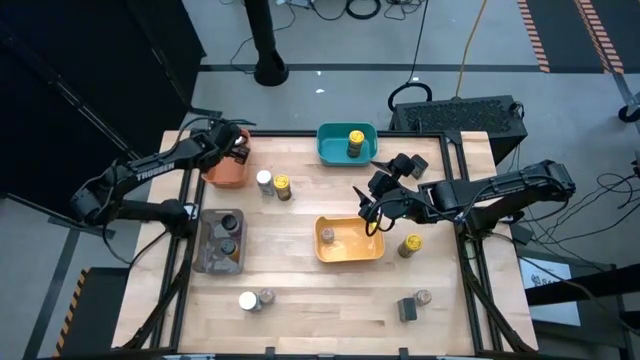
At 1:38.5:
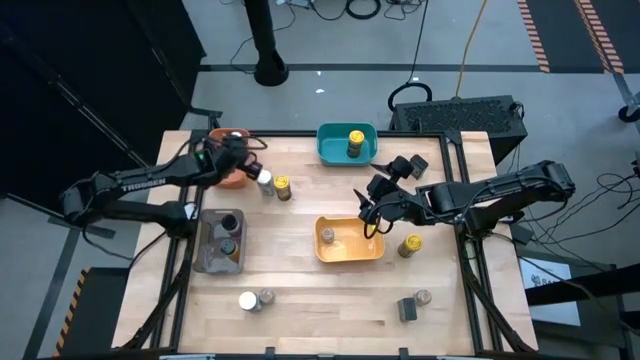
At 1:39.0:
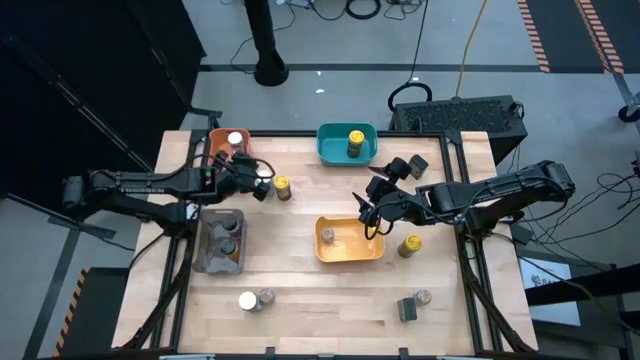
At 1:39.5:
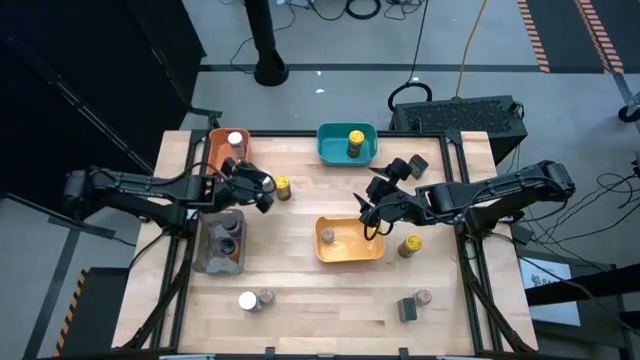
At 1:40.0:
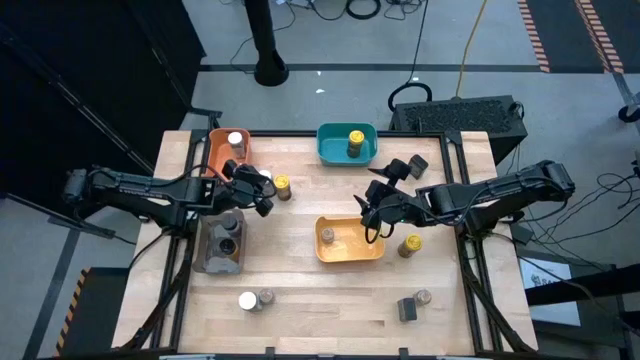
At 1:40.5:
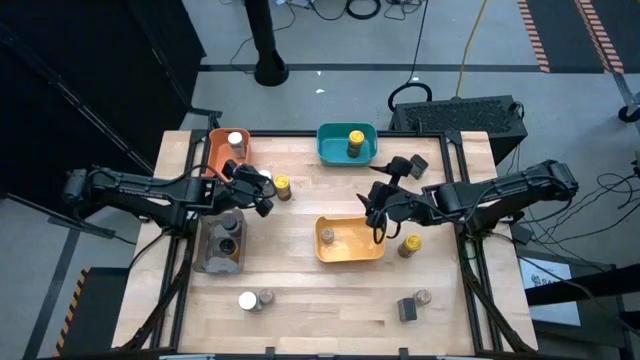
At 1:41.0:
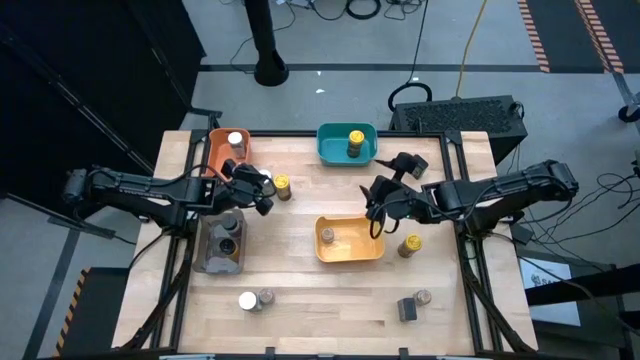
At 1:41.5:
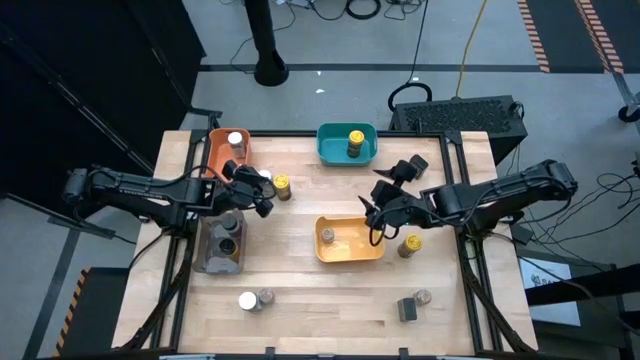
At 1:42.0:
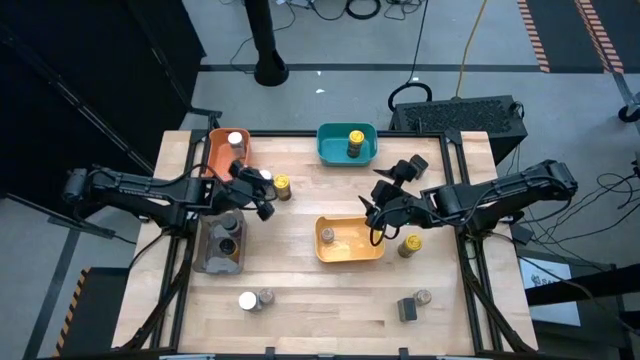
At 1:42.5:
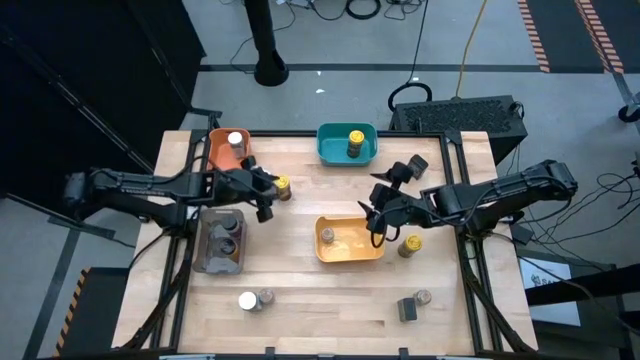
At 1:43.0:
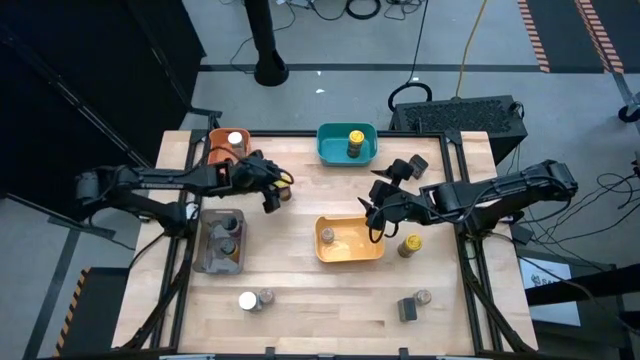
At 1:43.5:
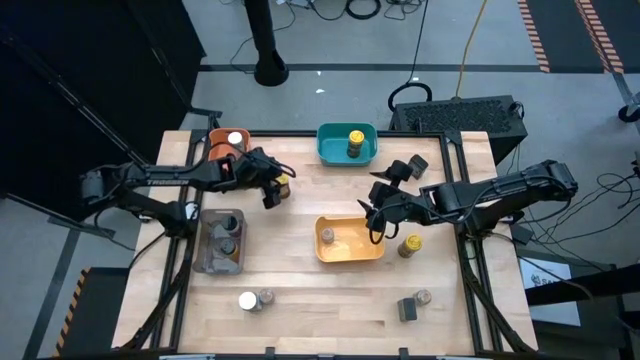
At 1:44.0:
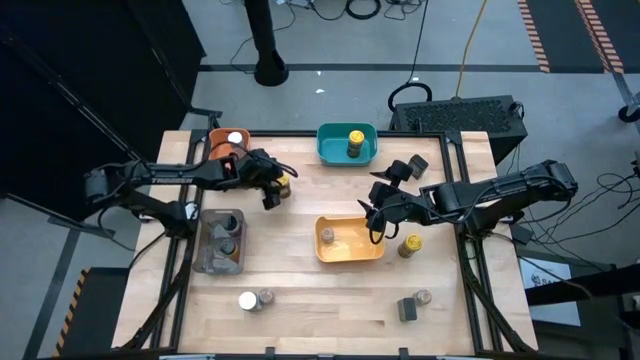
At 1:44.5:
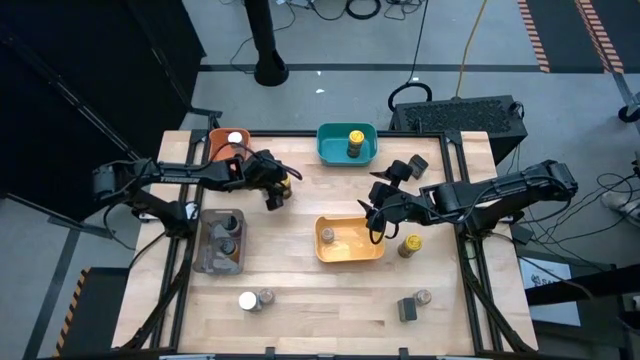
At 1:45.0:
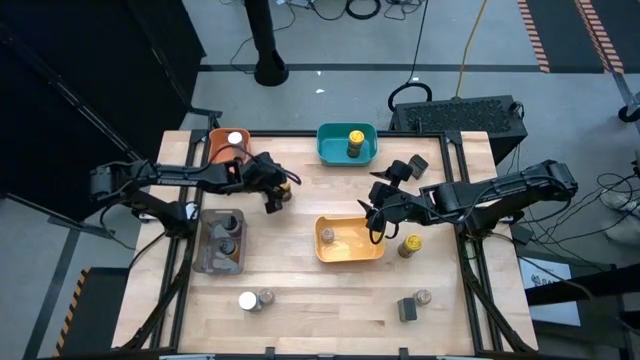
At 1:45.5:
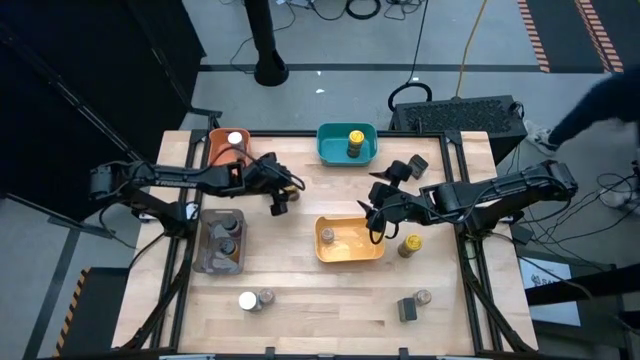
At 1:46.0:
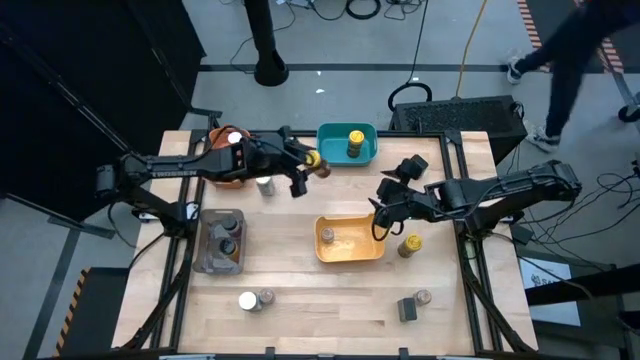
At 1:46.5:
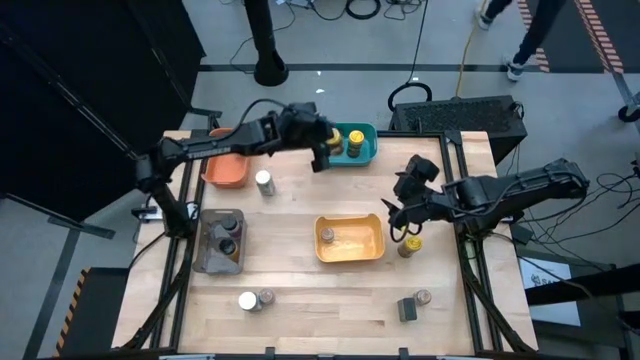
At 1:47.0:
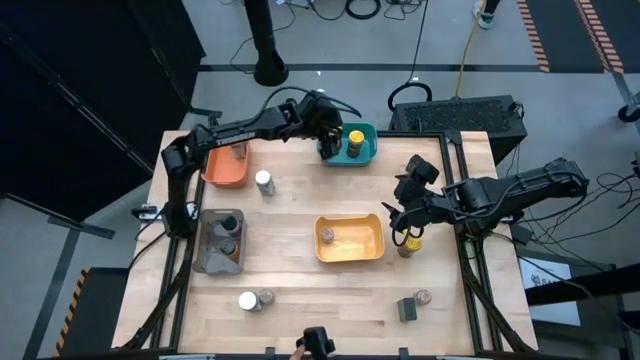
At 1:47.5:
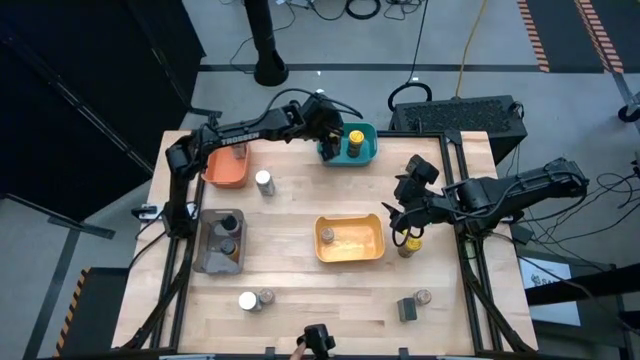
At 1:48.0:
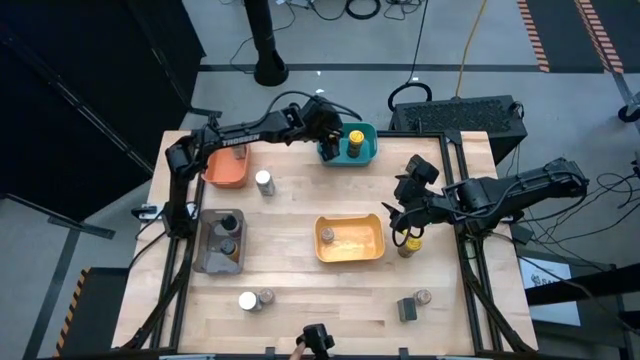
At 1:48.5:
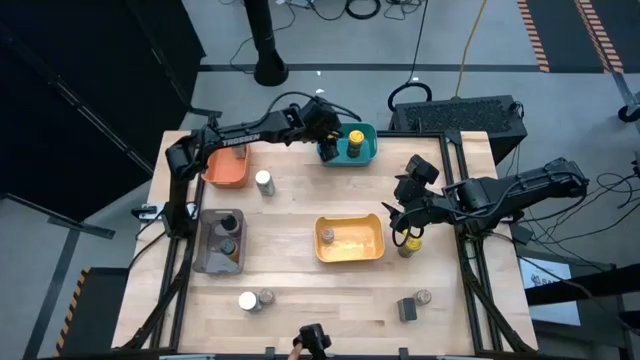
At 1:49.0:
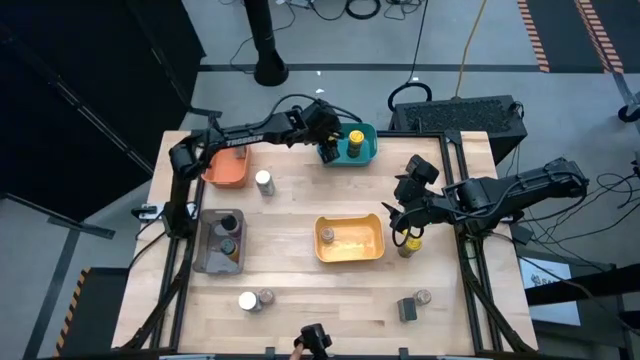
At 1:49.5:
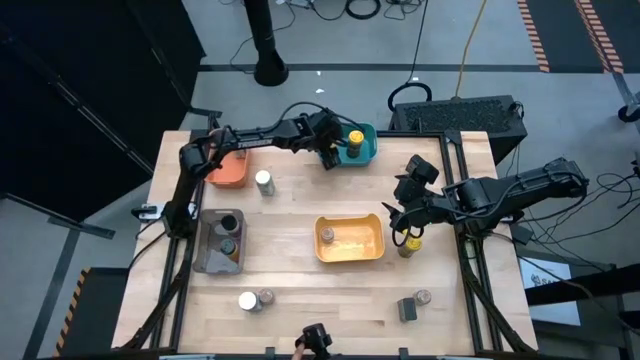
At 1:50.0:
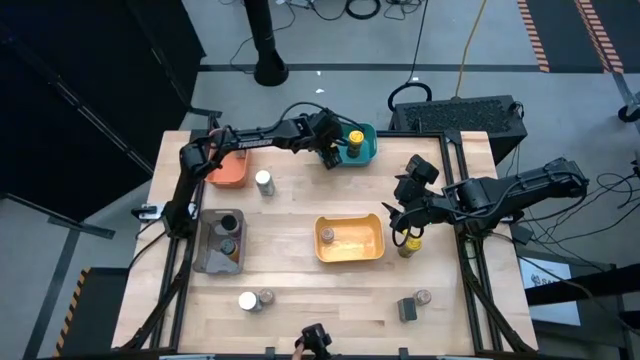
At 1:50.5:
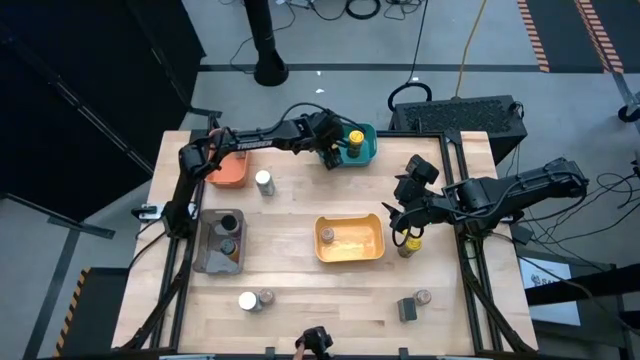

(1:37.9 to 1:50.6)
Task: Sort spices by type
Put the left yellow spice bottle into the green bin

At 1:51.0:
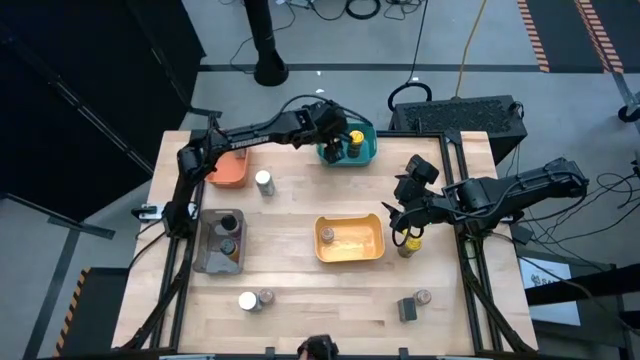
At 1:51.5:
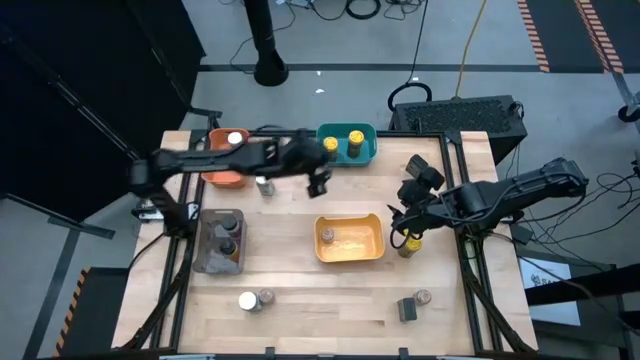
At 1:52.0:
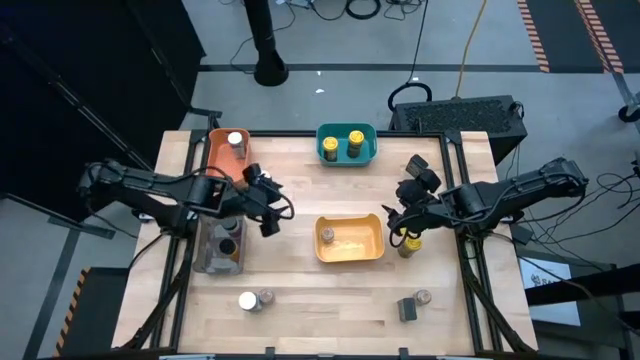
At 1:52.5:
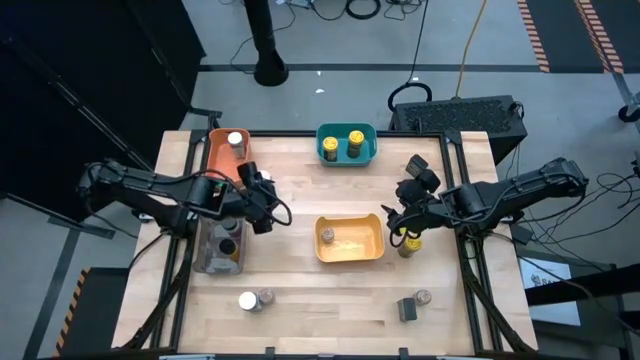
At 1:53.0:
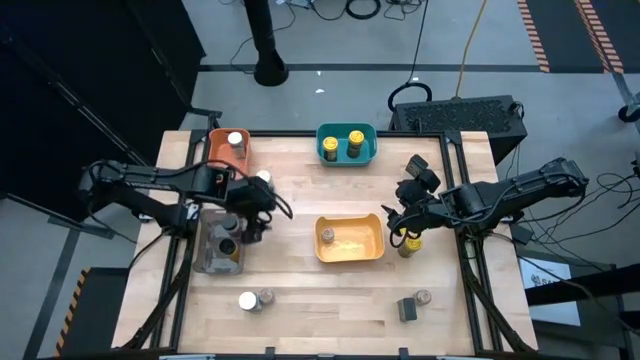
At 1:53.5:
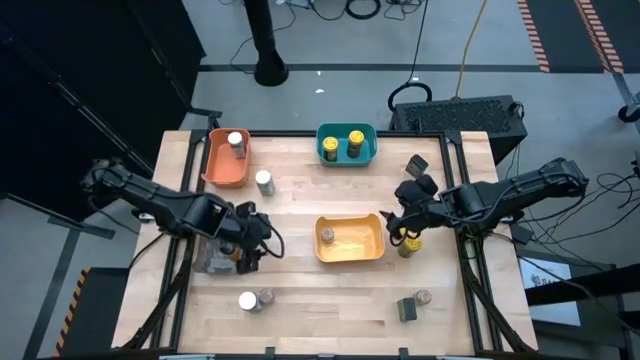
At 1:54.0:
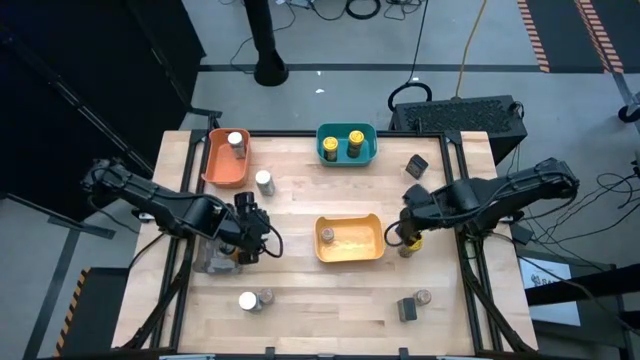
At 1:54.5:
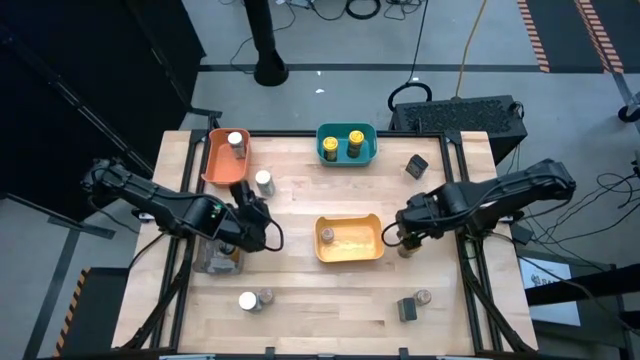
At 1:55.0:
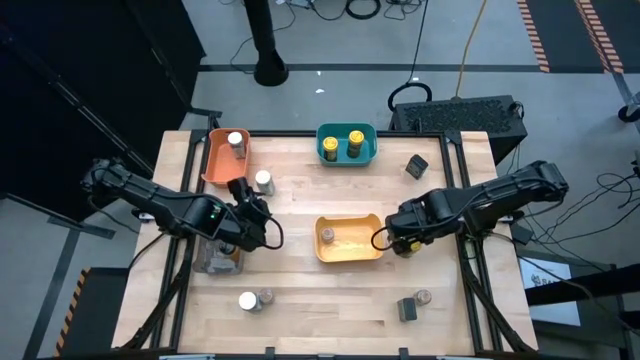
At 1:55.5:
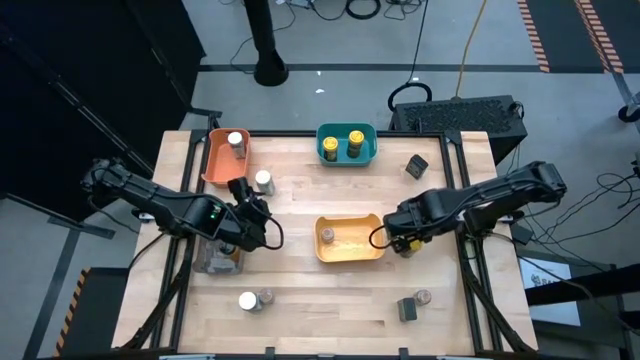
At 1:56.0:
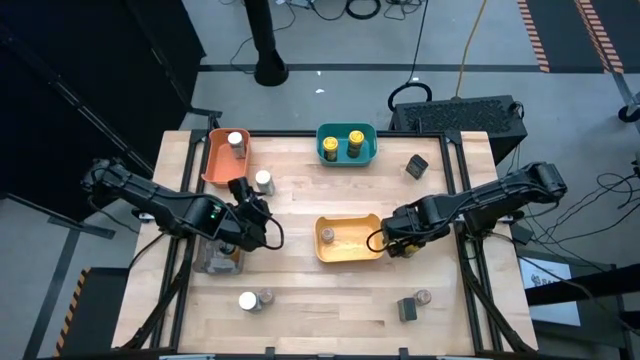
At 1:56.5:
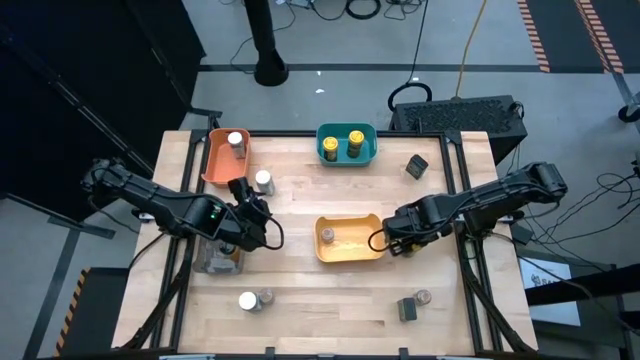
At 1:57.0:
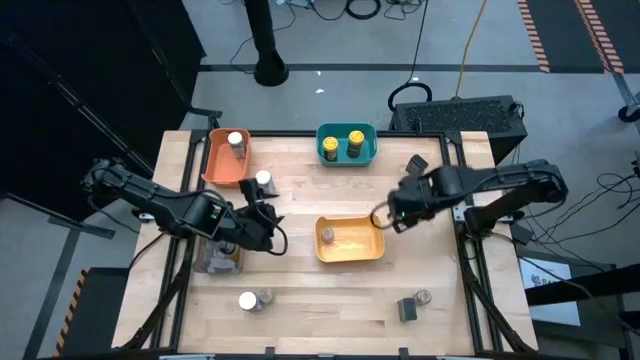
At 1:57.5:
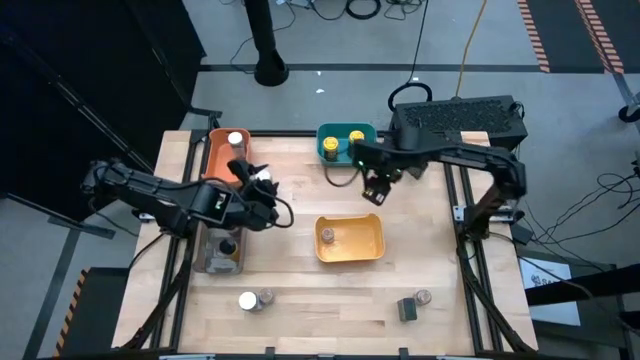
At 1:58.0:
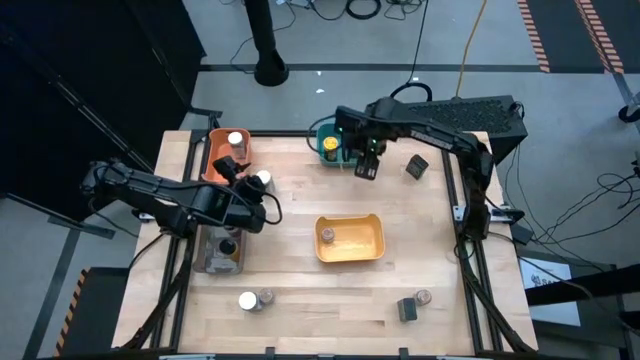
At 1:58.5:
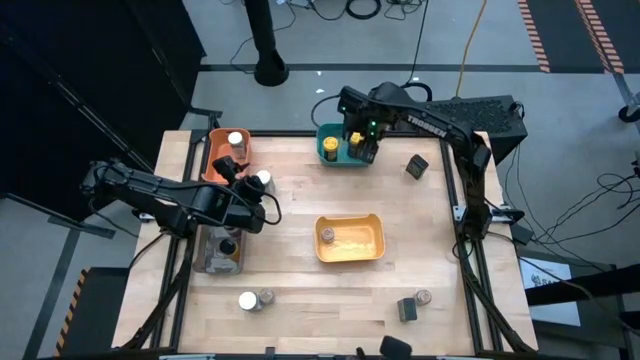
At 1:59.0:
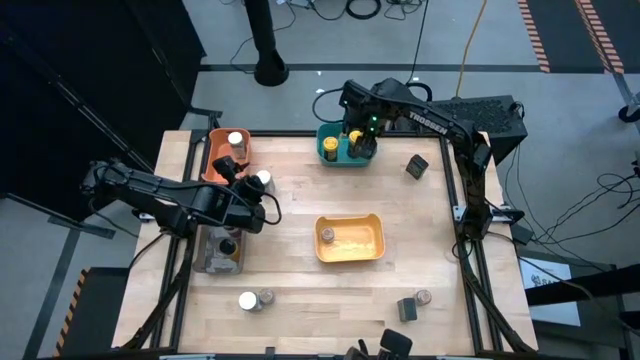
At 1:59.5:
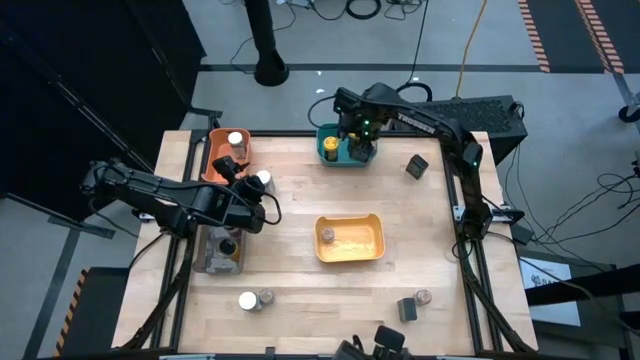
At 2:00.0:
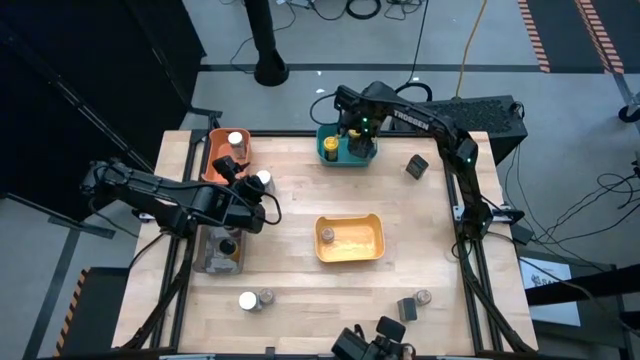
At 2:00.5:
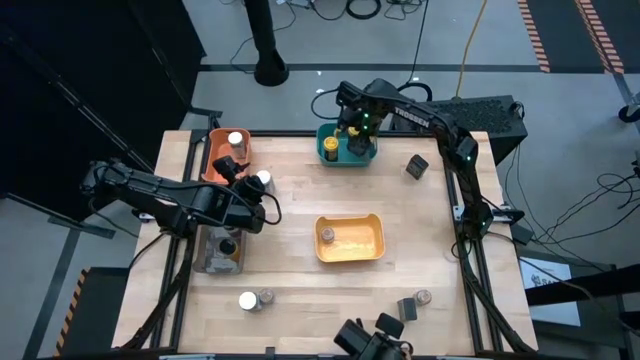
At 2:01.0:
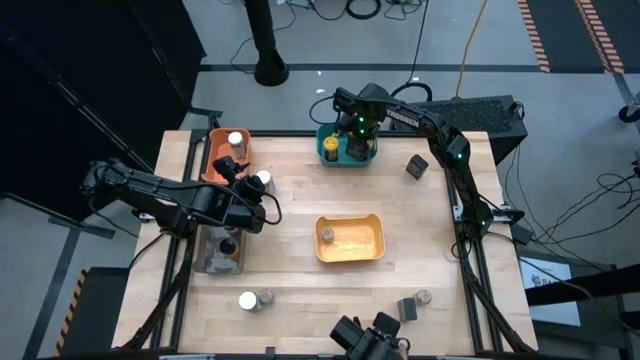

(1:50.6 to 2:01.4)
Put the yellow spice bottle into the green bin
